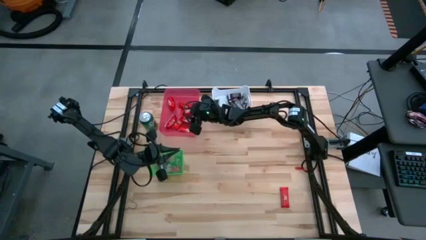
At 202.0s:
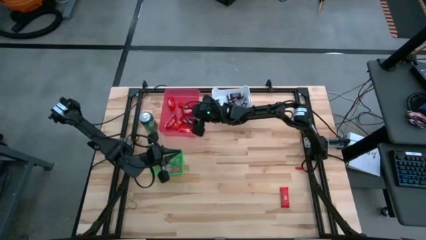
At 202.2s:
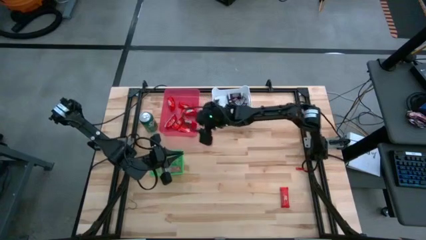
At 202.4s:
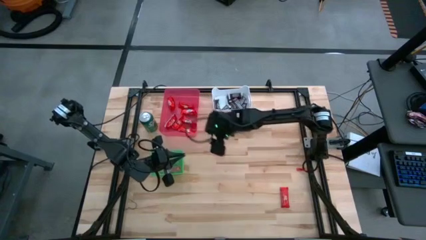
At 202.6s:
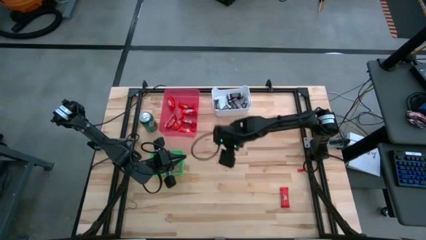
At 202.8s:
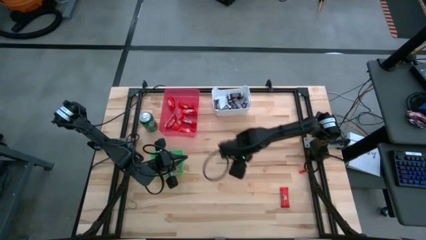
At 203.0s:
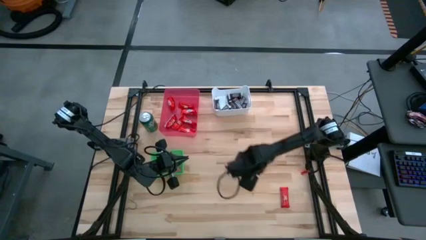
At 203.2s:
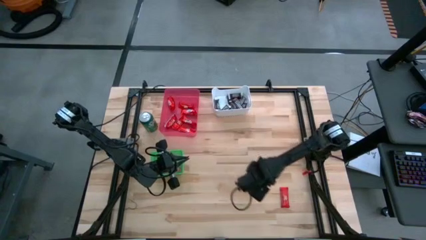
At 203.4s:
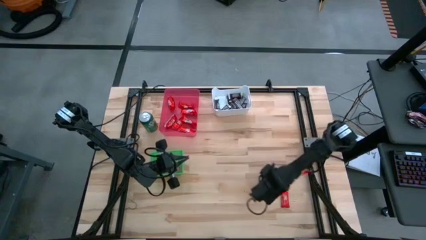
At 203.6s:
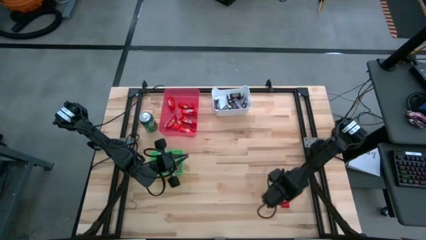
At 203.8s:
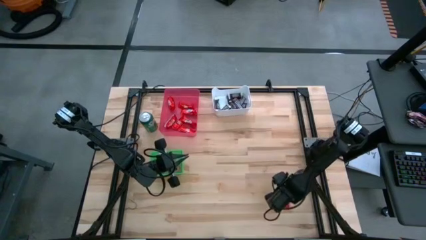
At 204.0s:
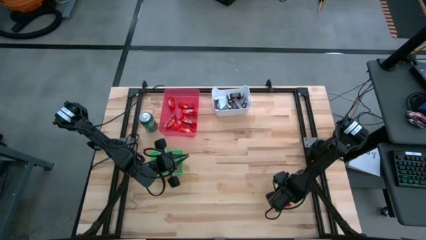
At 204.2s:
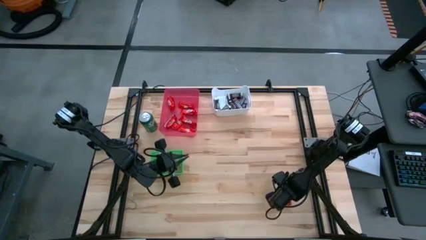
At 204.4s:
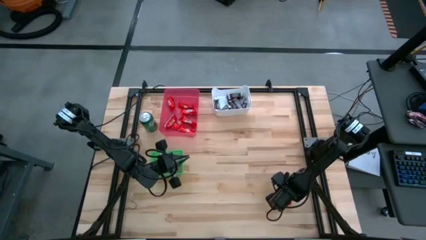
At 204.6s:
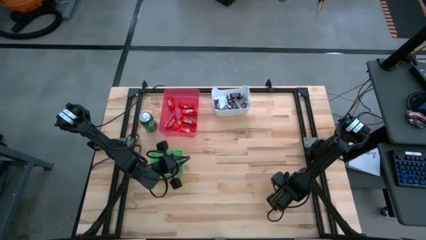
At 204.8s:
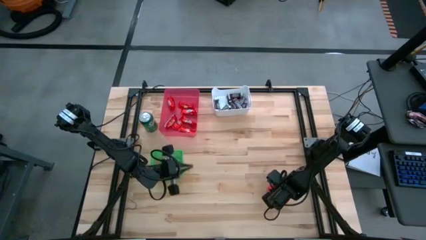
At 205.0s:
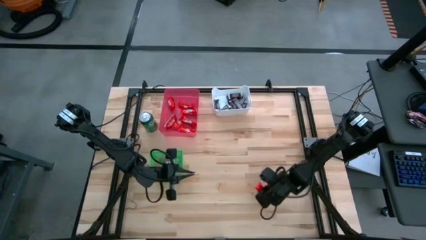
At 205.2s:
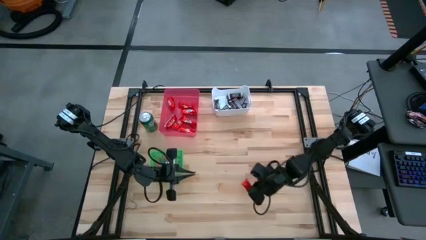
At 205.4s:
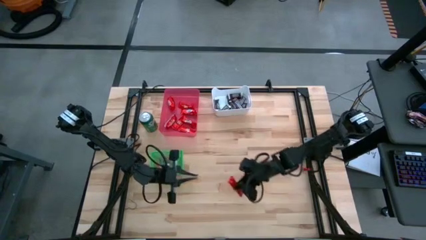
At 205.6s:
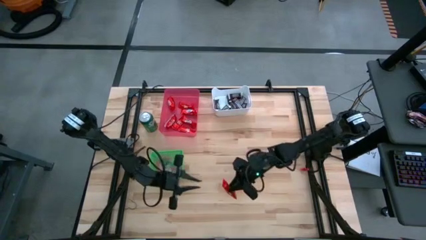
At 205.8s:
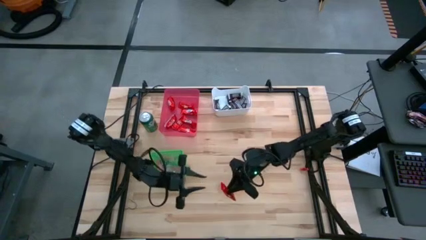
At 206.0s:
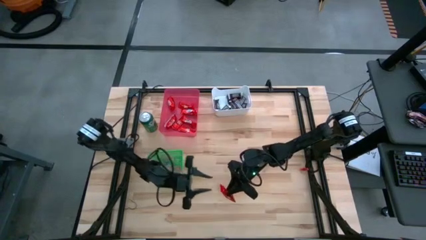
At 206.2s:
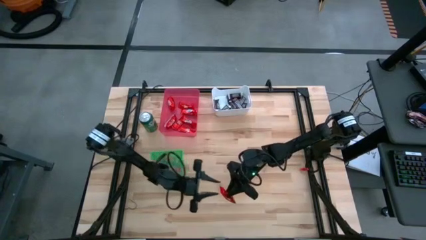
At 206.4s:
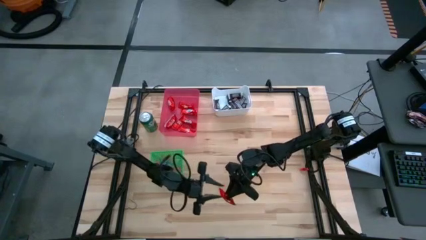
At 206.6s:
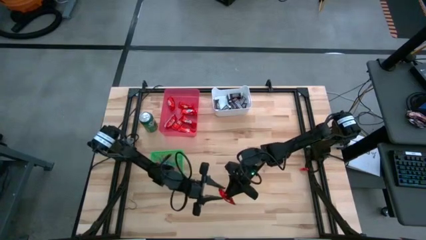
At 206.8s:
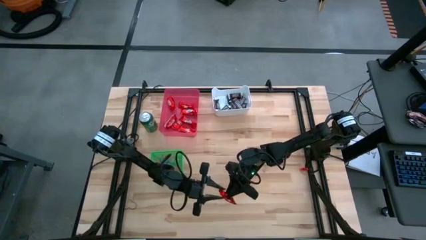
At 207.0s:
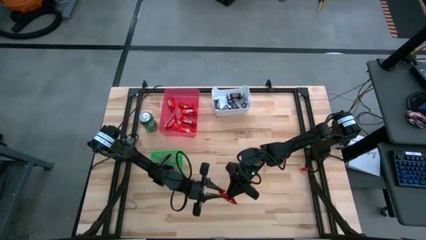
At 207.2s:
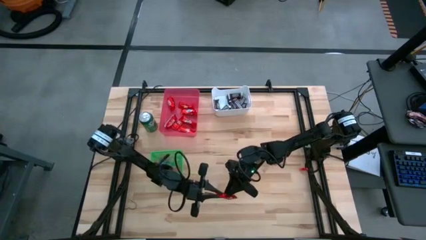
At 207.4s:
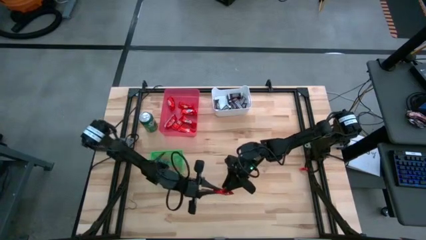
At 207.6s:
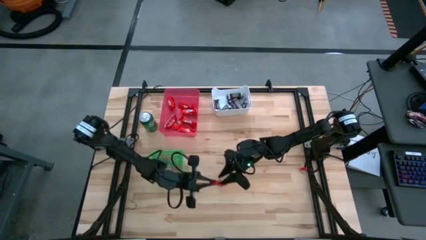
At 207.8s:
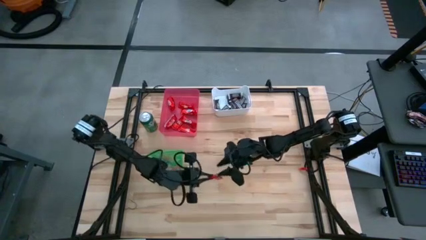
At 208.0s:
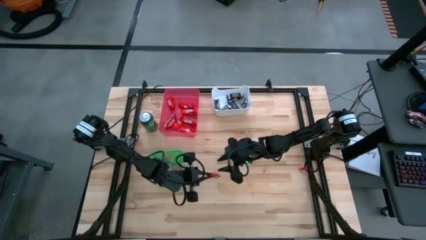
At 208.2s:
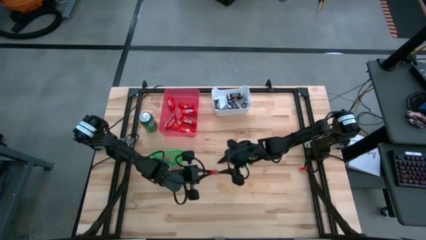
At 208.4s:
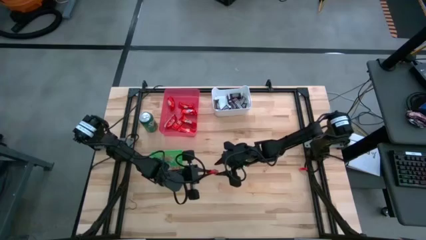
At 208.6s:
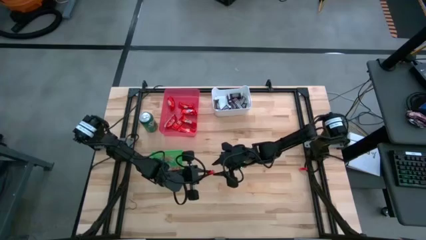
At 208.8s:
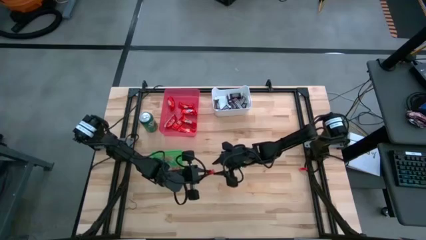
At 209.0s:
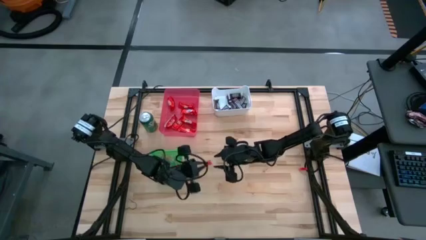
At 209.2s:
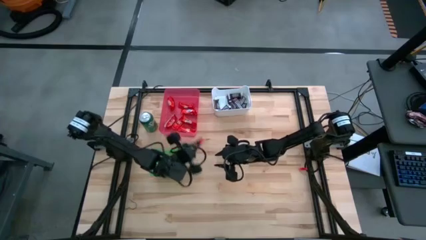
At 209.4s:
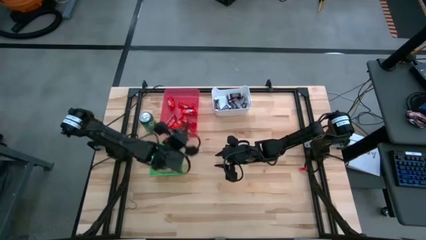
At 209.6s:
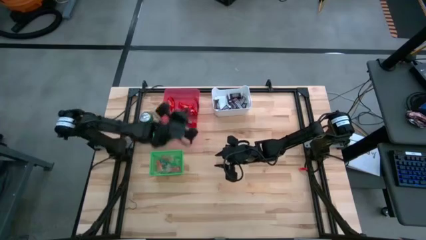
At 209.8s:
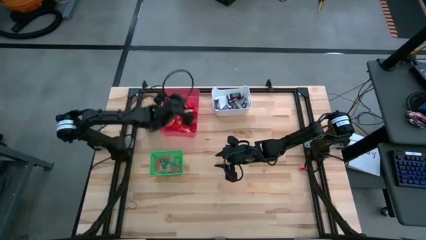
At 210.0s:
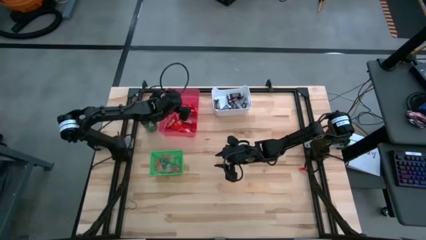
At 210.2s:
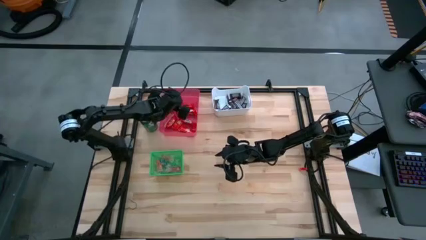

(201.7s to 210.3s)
Task: Organize candy in baskets
Put the red chocolate into the pink bin

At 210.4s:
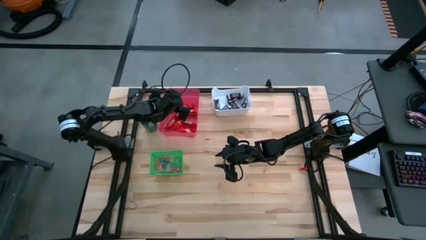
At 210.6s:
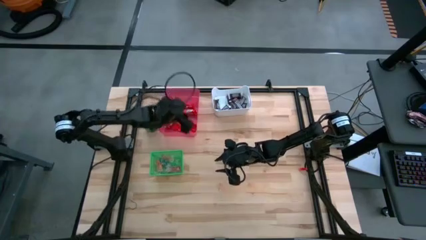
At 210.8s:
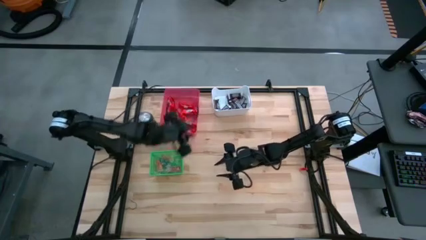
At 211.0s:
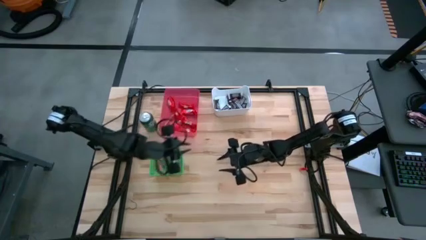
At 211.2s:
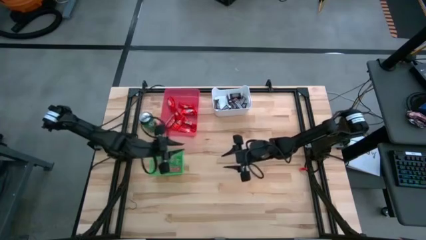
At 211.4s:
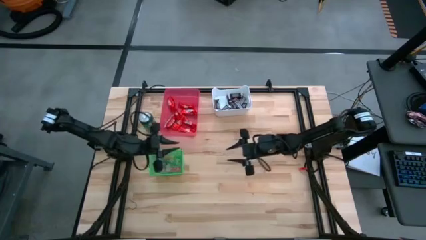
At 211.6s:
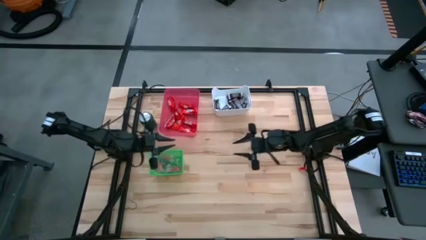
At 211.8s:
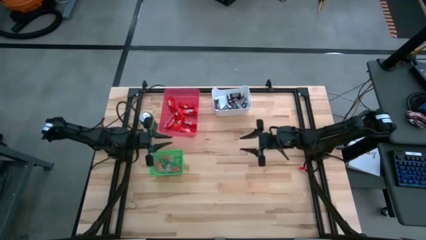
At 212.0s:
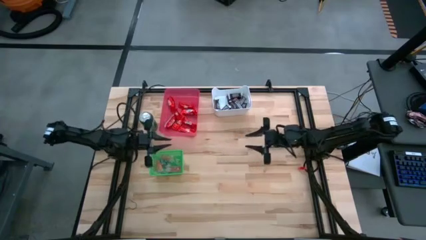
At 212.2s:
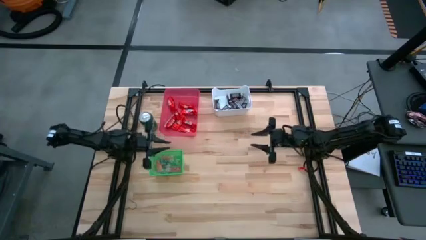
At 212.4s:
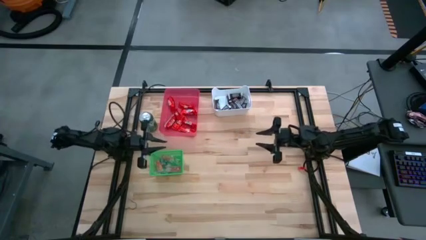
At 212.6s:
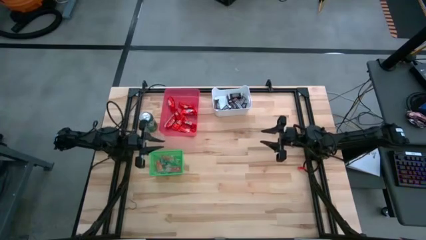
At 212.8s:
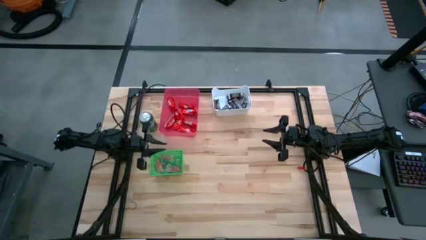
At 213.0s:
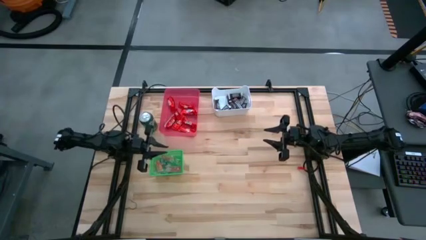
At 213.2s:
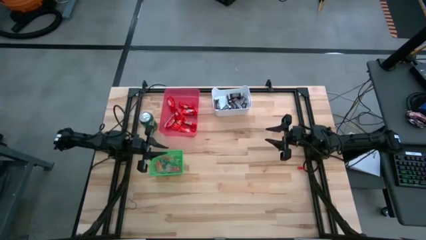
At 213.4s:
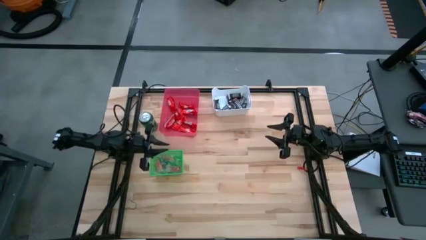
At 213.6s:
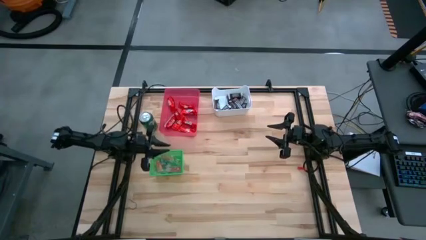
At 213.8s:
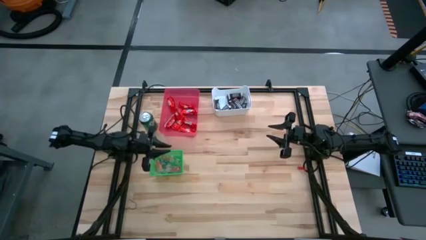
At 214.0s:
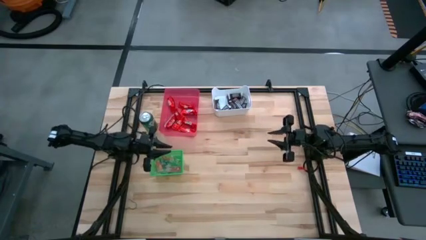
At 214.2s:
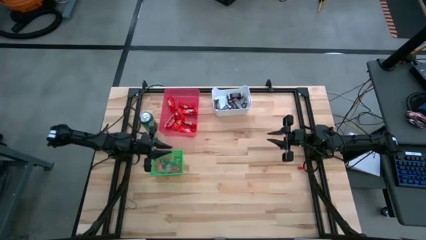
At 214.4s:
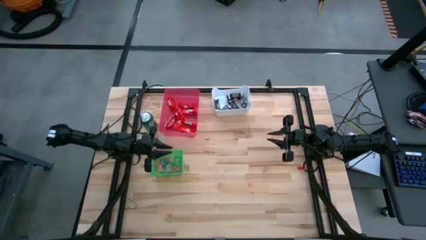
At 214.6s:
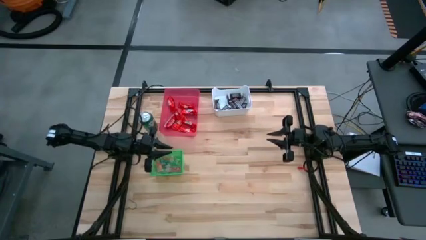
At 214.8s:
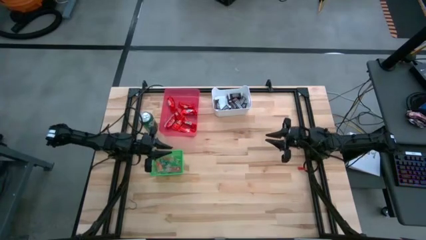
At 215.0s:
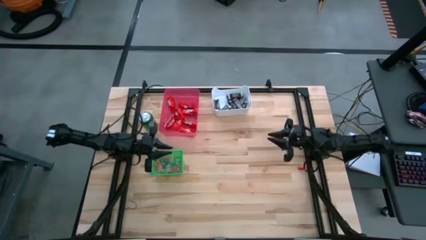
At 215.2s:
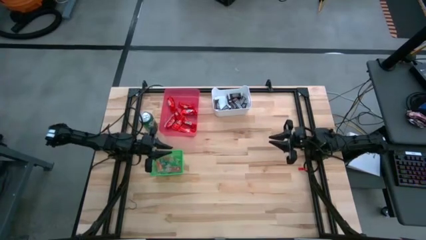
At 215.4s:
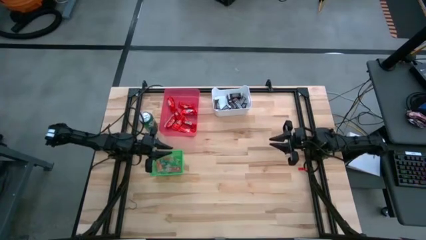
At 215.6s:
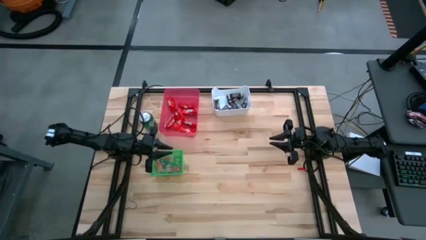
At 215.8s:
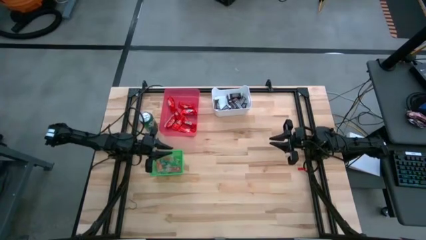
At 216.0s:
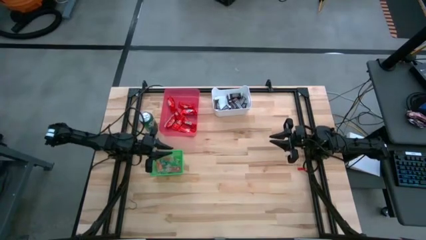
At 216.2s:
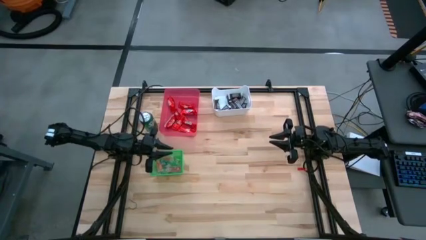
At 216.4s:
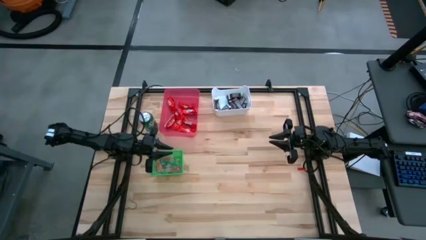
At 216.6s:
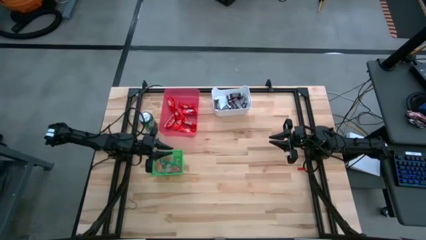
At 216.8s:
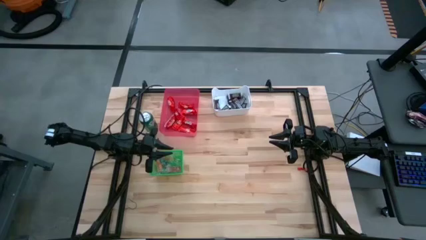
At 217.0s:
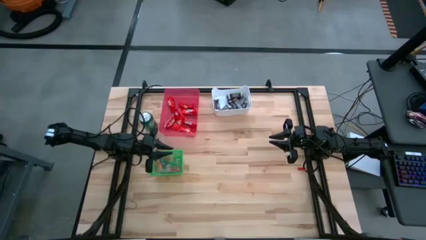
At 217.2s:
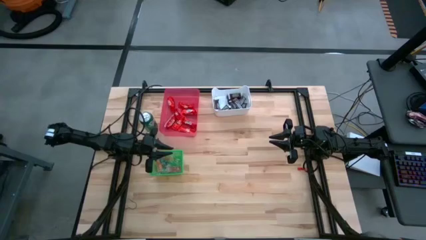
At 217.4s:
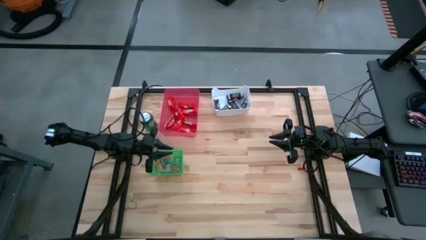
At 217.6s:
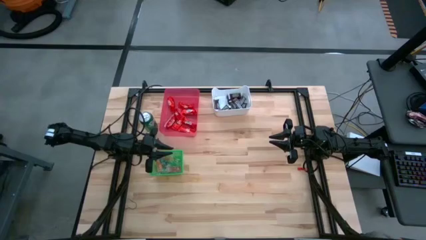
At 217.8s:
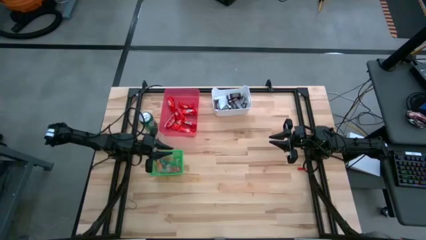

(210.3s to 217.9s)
Return to Home Position
